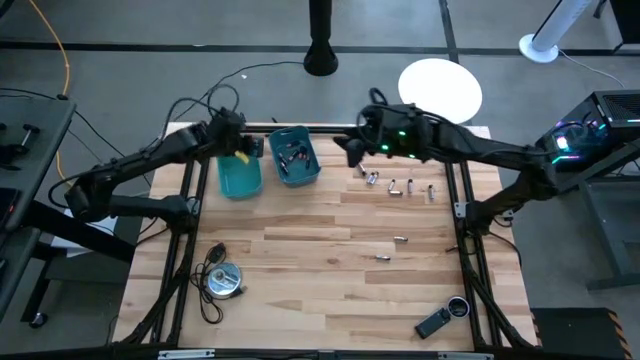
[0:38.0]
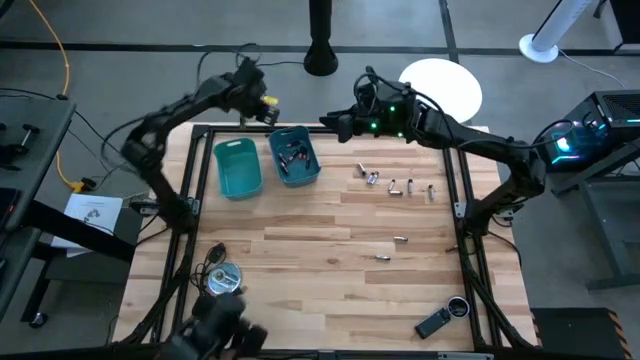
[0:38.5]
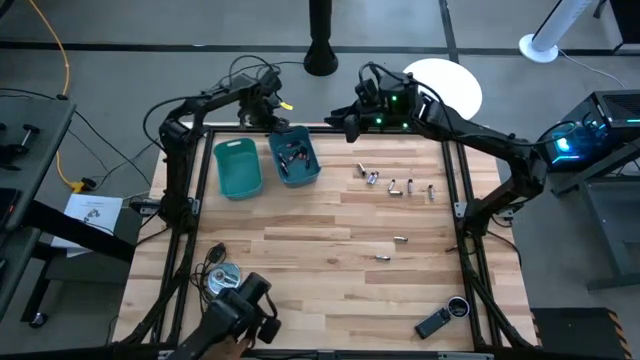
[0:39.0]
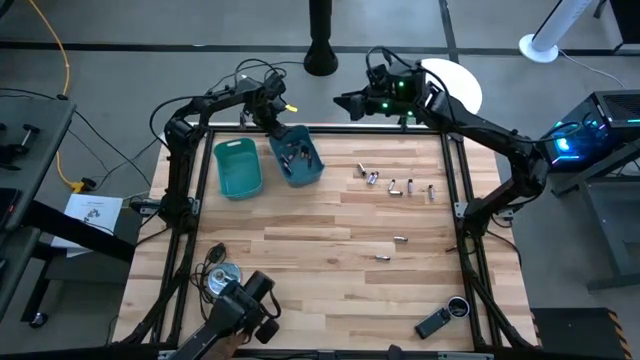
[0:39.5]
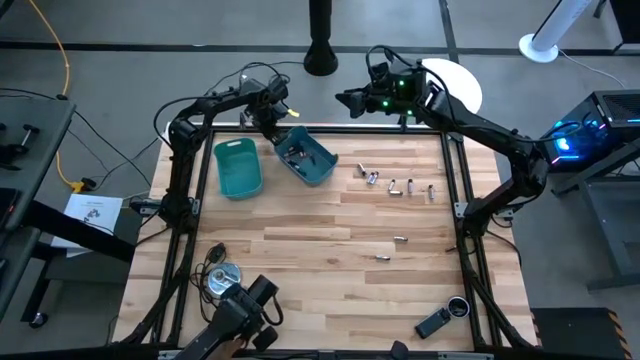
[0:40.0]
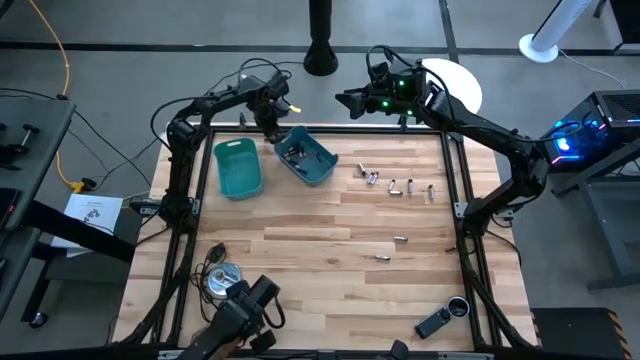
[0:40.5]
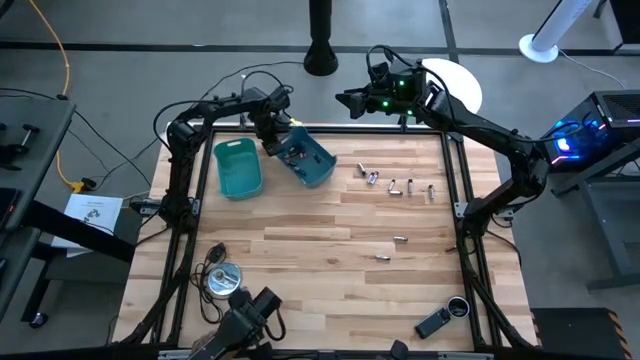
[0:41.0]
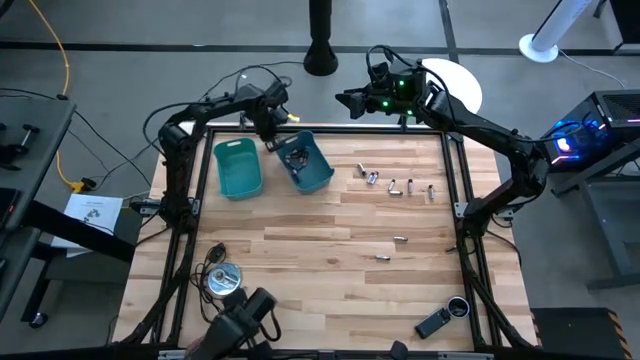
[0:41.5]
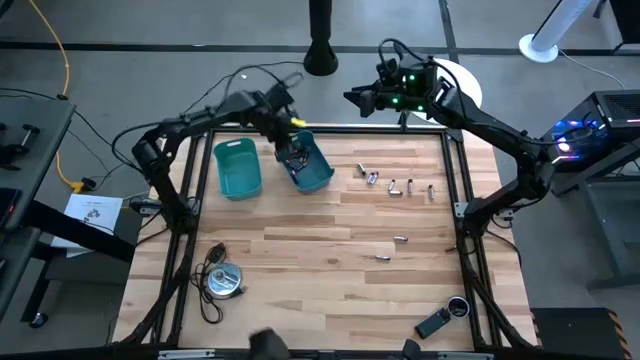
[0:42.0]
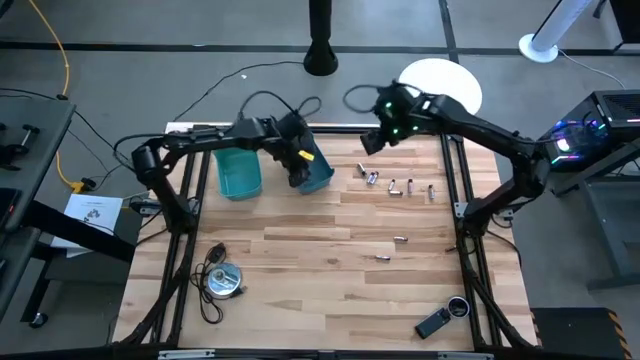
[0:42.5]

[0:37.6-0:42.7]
Task: Sort batteries
Put the black battery into the blue bin

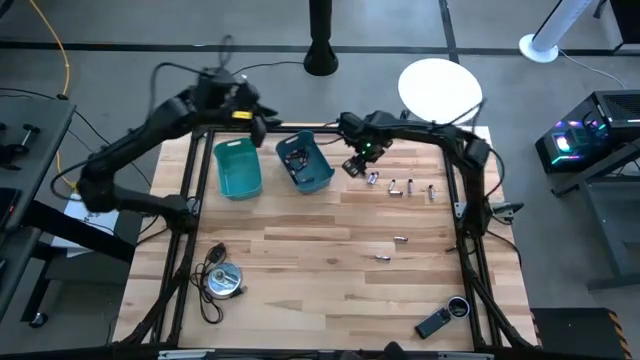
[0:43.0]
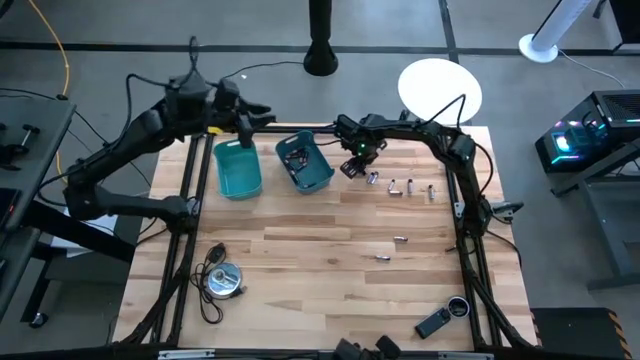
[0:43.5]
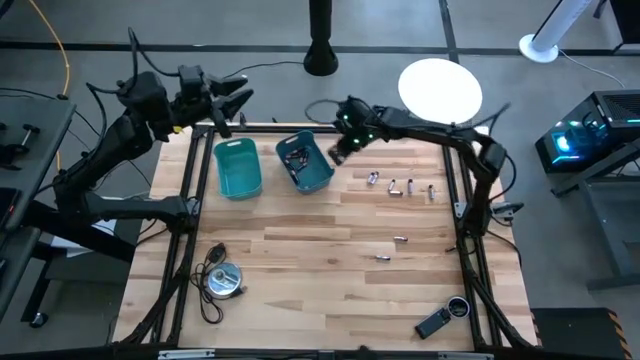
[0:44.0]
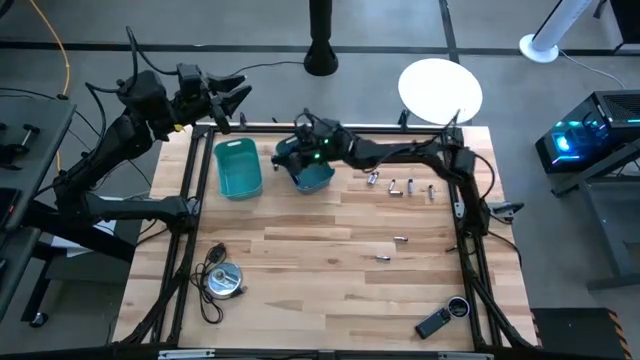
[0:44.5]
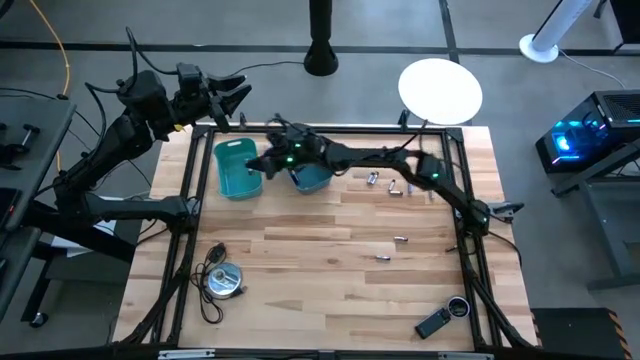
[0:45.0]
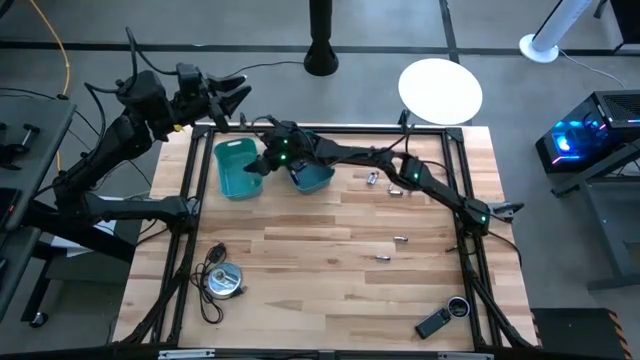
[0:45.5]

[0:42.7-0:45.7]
Put the silver battery into the green bin

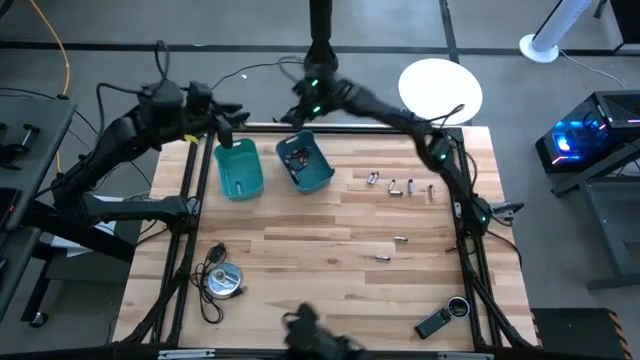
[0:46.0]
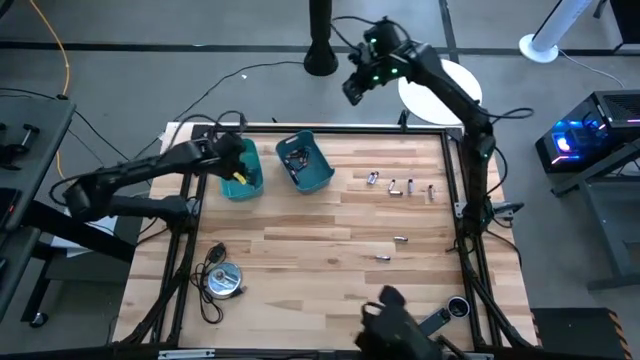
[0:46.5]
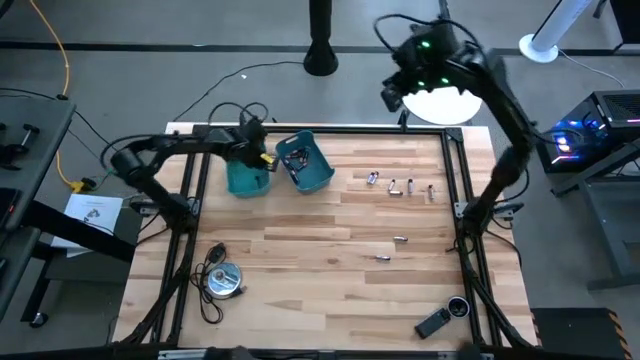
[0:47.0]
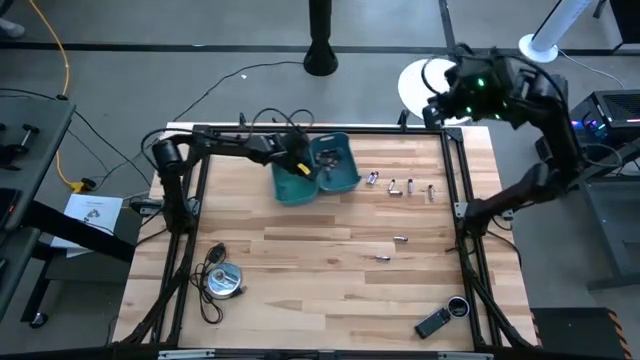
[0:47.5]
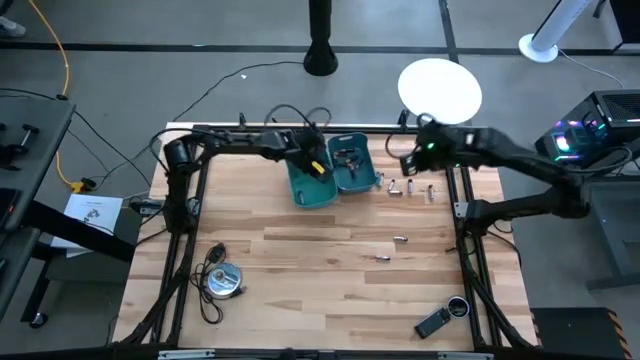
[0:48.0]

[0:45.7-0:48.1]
Move the green bin to the center of the table

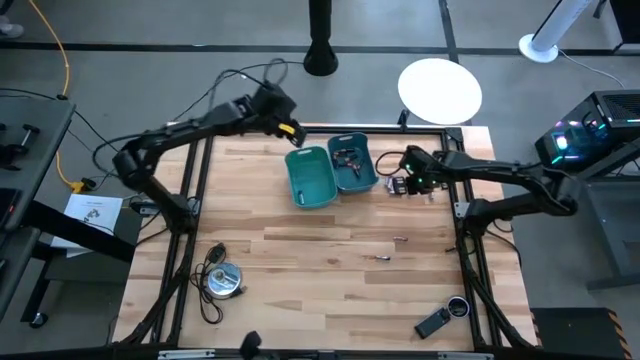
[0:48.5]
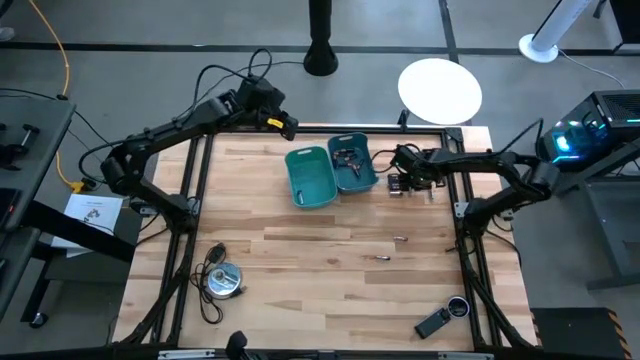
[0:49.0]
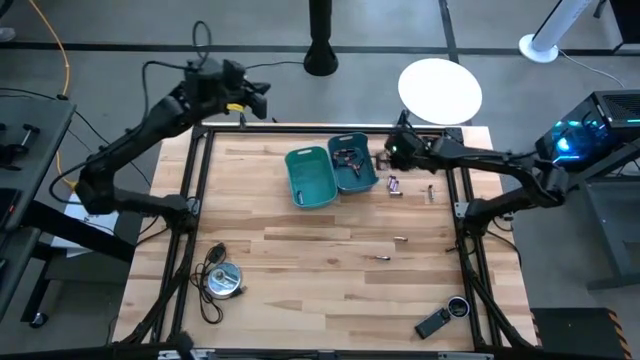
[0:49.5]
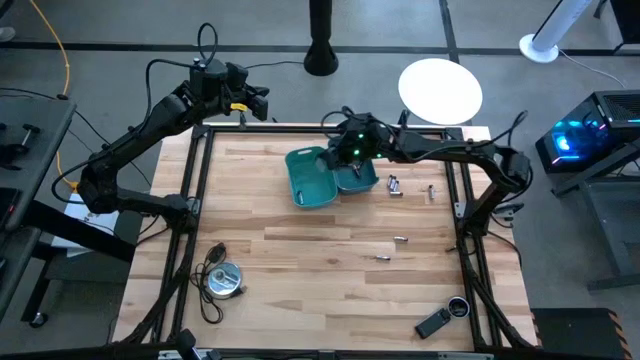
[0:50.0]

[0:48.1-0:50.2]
Put the silver battery into the green bin

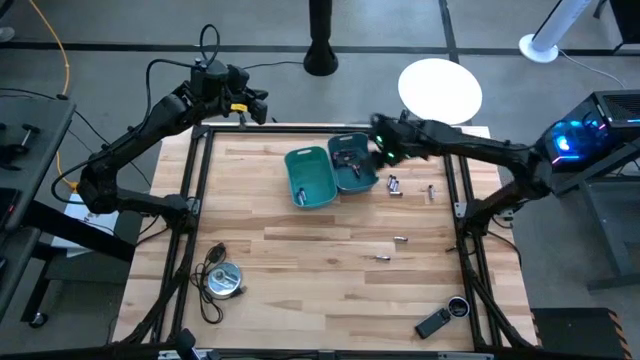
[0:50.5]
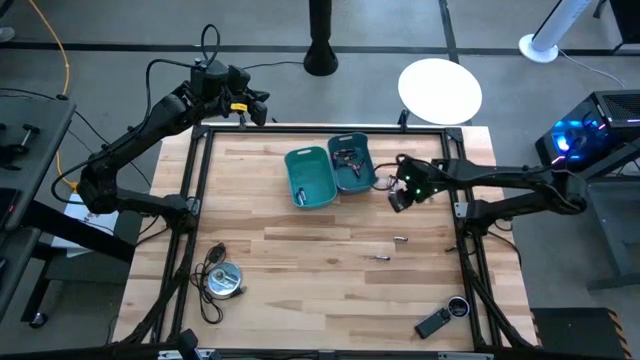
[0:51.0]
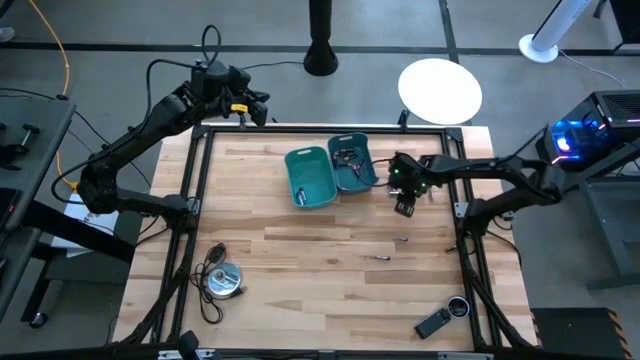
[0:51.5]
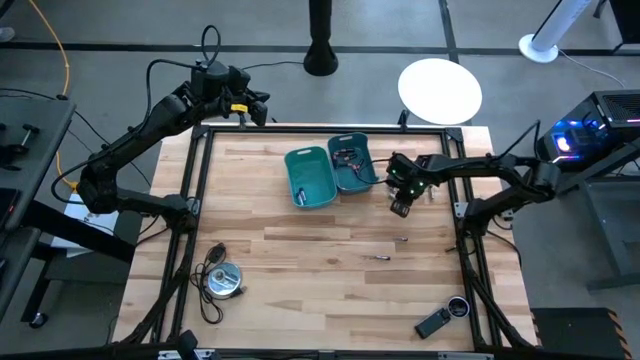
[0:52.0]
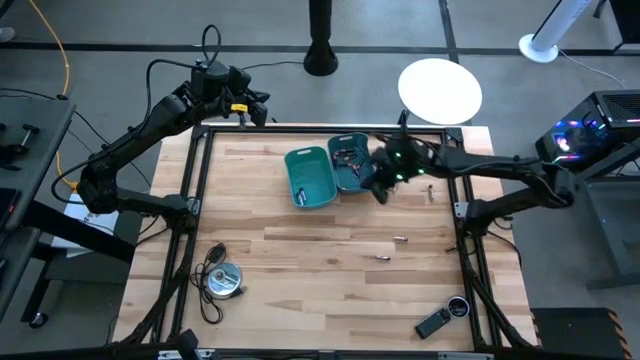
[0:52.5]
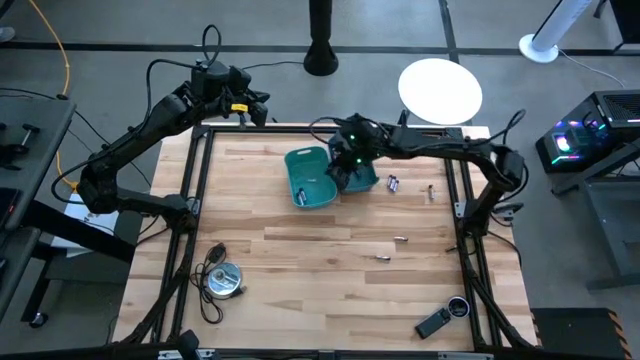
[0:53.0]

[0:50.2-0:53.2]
Put the silver battery into the green bin

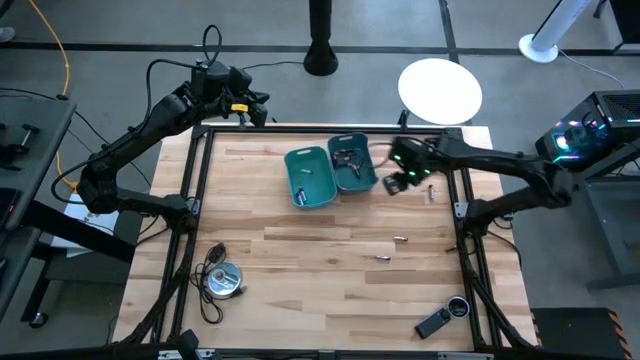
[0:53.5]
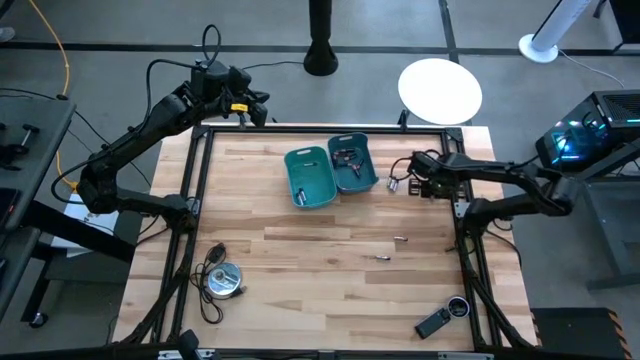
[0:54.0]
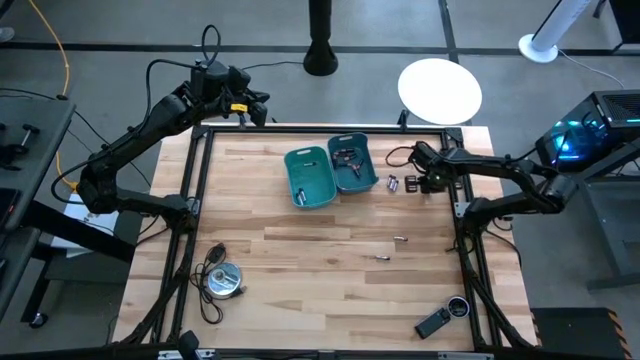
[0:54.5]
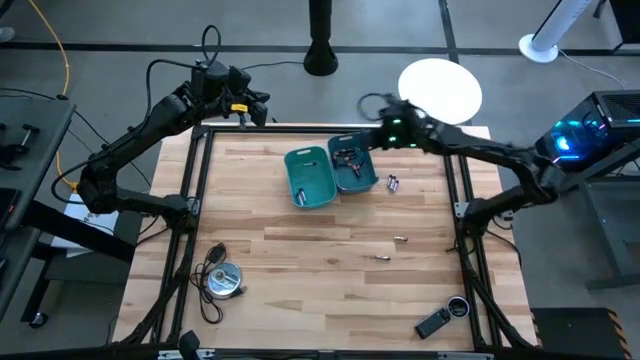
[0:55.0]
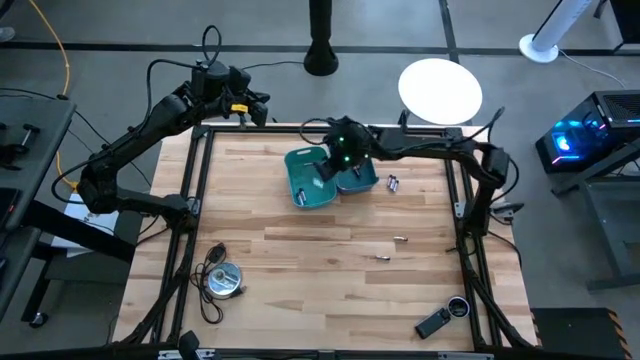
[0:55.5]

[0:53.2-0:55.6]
Put the silver battery into the green bin

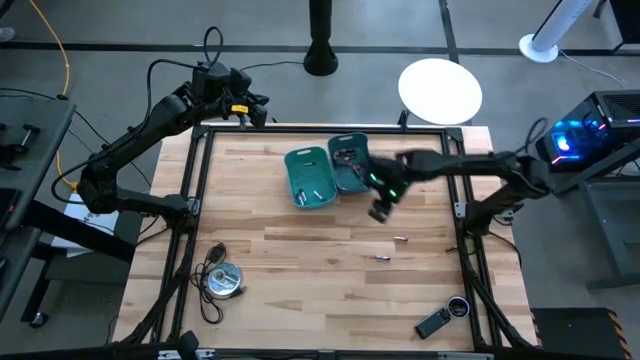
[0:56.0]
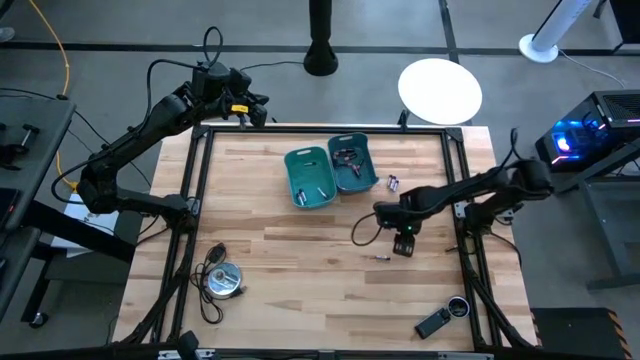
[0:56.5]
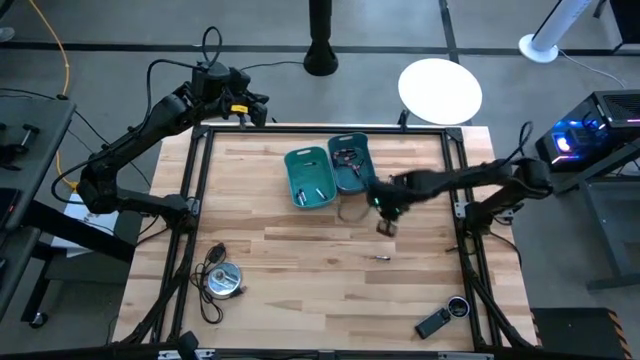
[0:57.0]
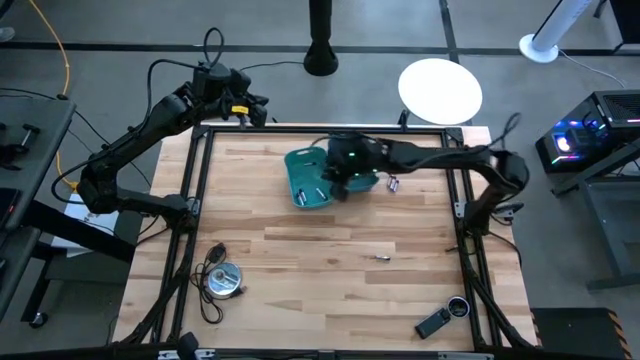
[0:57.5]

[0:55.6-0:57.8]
Put the silver battery into the green bin

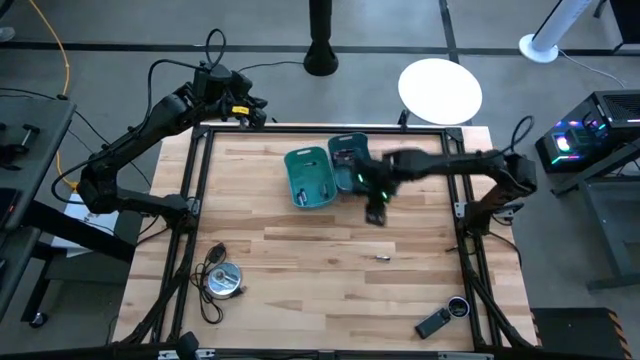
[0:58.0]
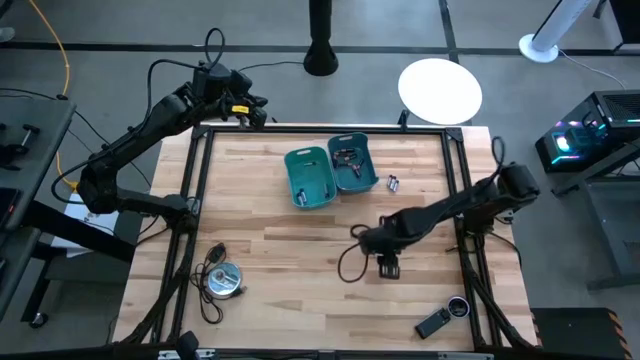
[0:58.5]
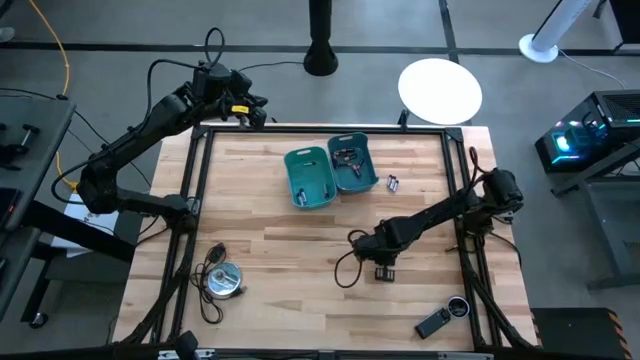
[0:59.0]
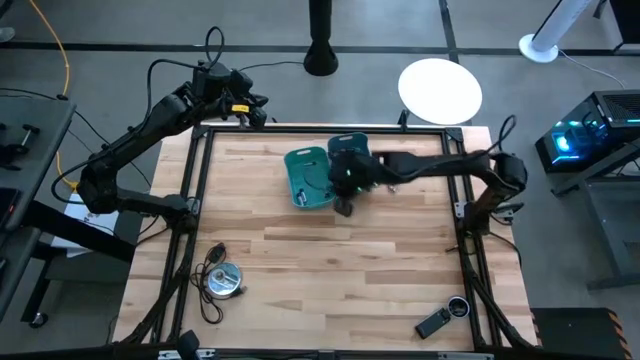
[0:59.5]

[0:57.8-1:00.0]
Put the silver battery into the green bin
